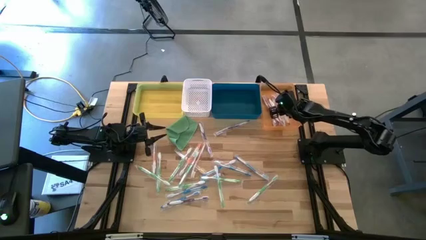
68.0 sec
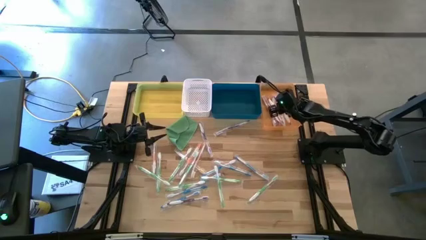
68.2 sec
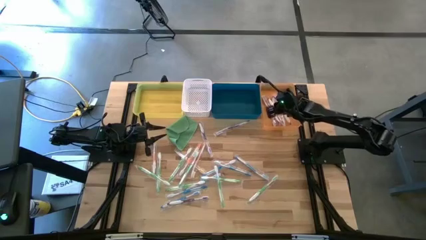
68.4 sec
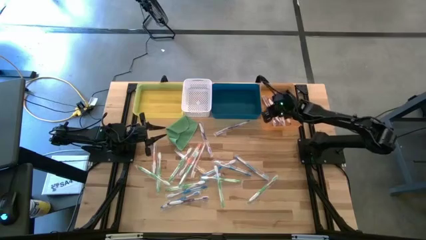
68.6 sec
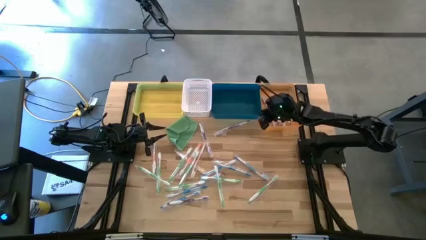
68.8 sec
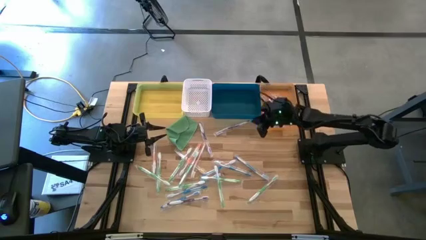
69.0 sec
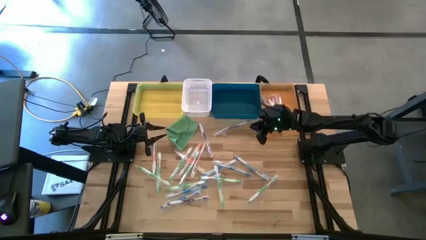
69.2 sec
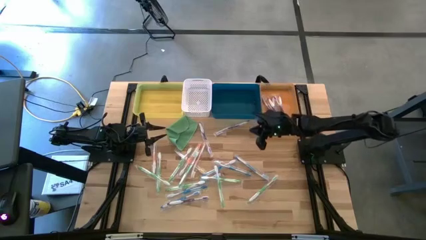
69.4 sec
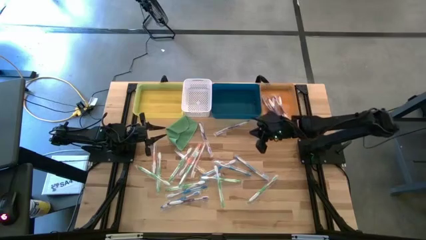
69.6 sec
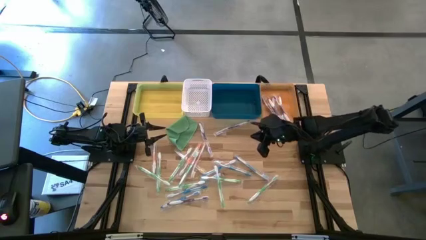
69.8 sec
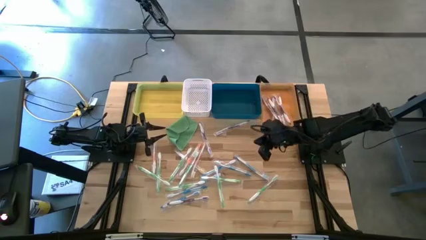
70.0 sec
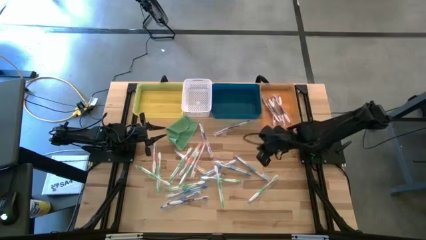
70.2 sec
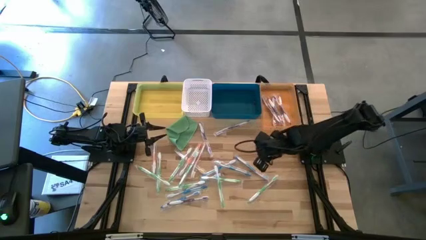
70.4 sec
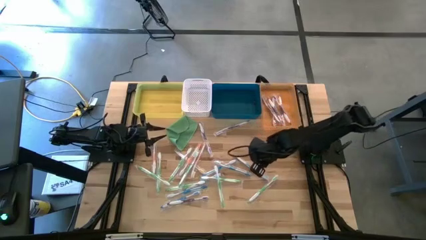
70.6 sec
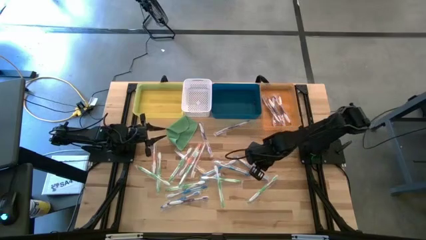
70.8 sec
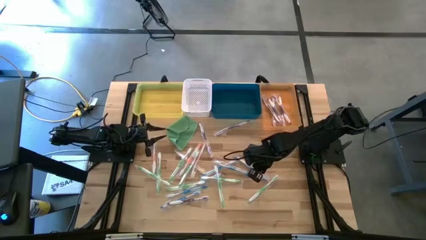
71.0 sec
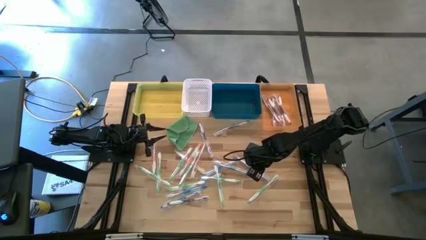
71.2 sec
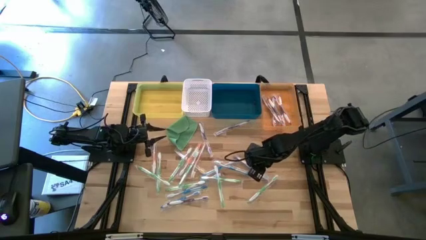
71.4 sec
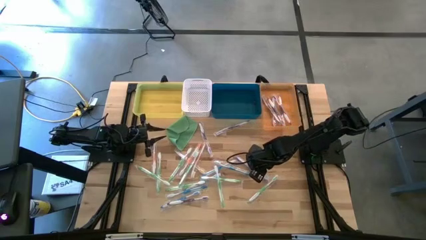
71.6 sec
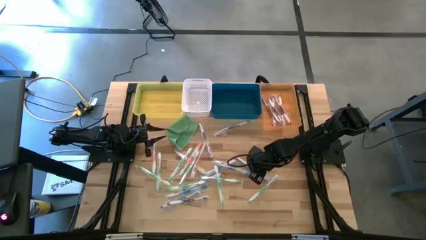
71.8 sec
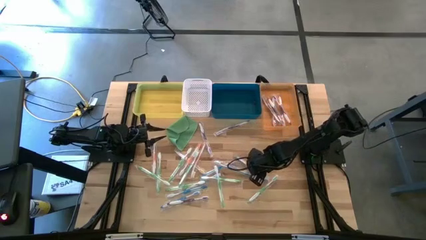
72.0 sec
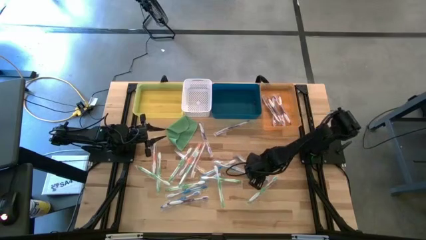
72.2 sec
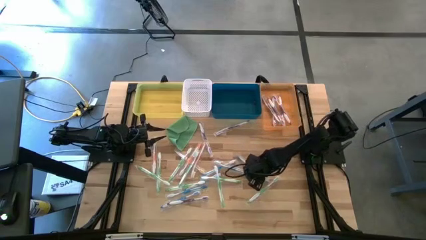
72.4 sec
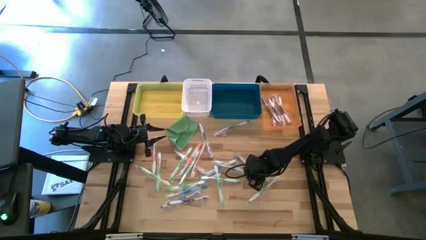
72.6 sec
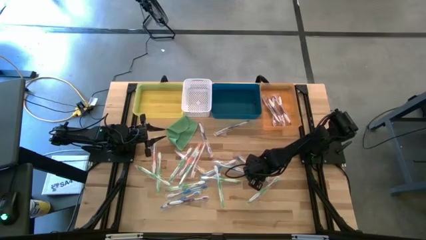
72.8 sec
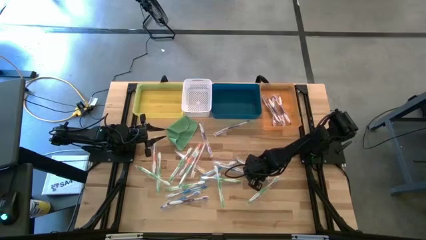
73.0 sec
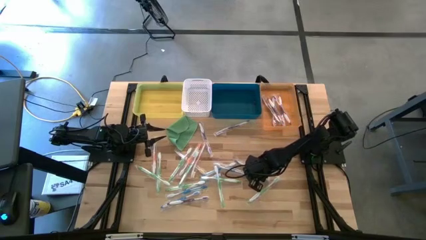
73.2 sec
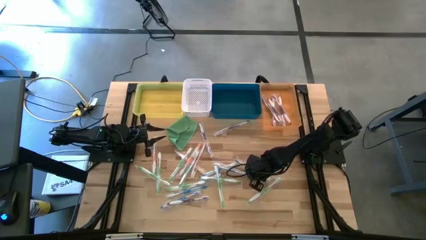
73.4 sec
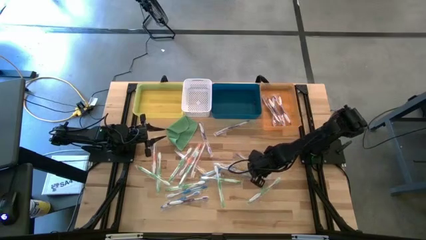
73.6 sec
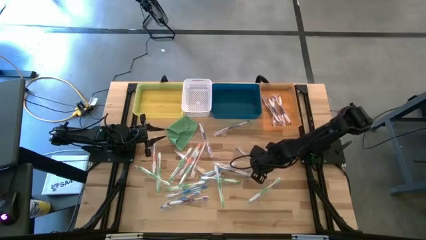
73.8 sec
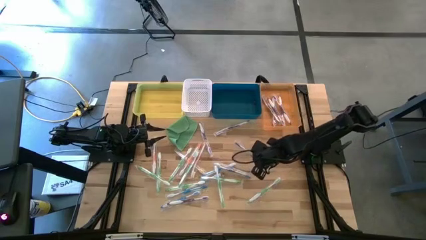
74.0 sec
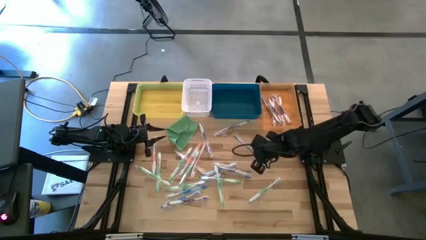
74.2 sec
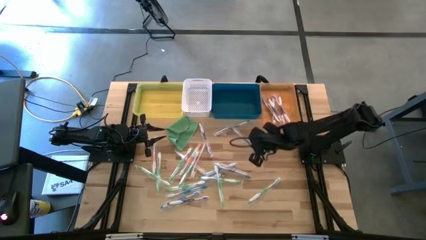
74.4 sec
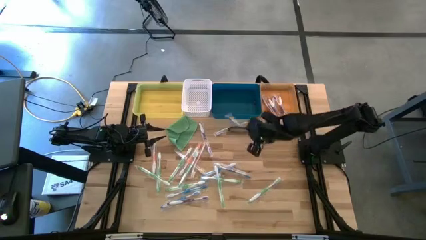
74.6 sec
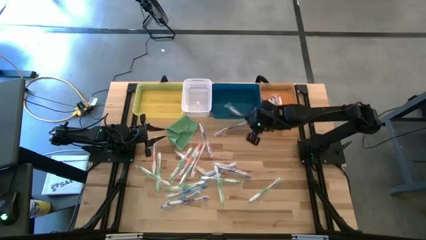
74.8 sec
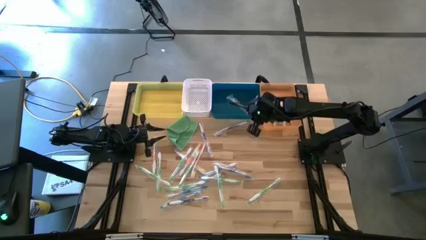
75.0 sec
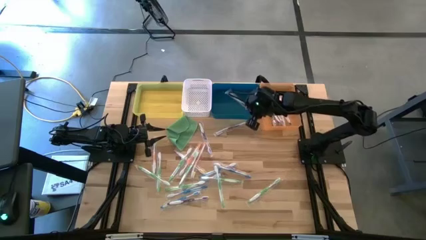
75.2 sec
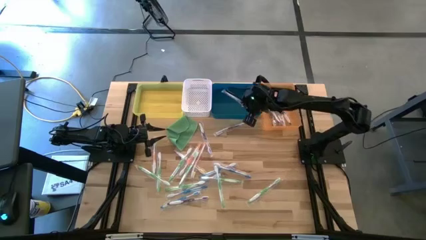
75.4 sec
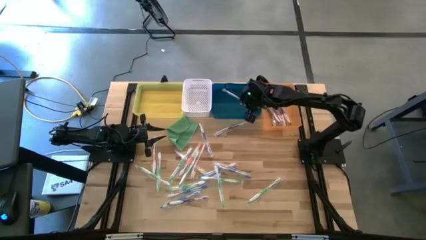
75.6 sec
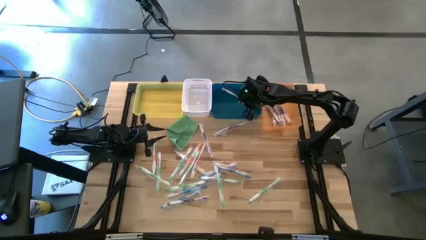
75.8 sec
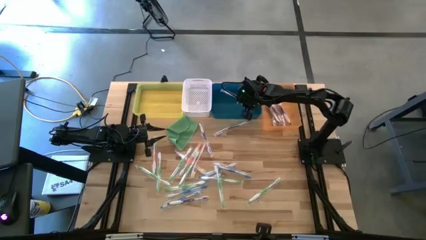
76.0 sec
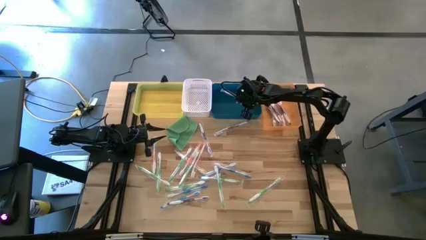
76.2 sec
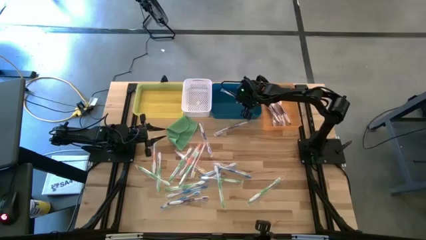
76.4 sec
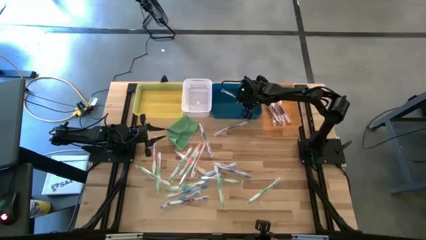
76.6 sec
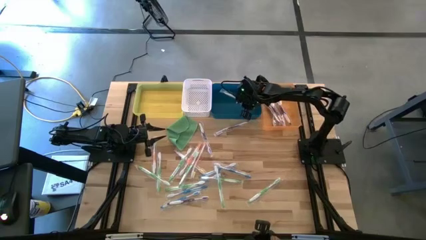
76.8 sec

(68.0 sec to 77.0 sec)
Task: Pick & Place Toothbrushes
Put the blue toothbrush into the blue bin

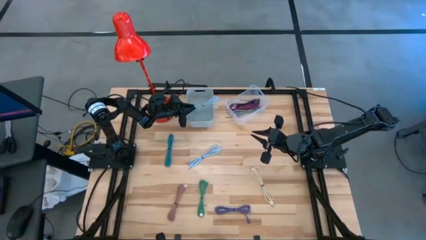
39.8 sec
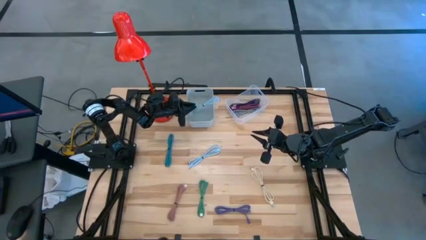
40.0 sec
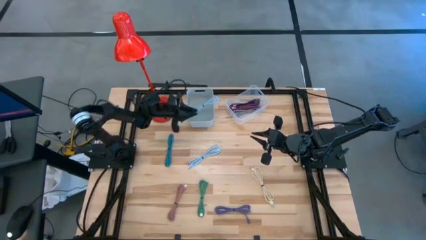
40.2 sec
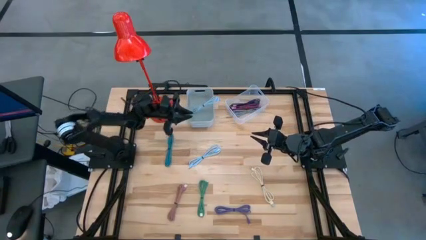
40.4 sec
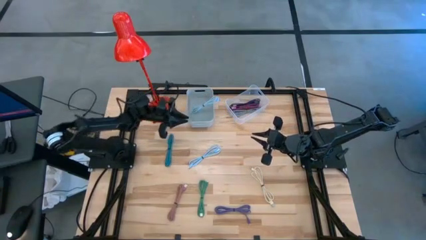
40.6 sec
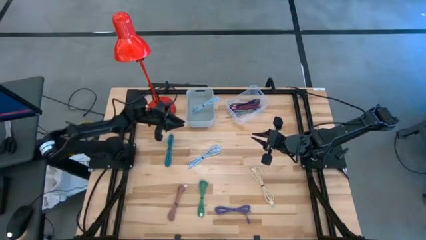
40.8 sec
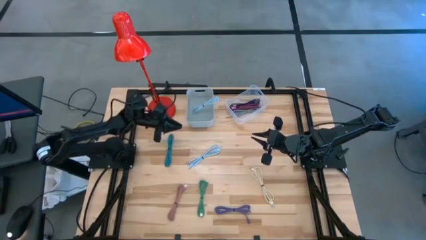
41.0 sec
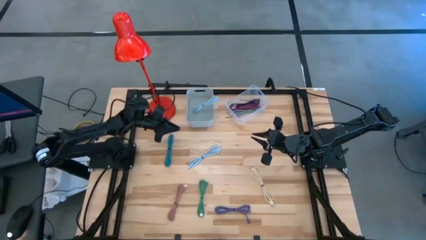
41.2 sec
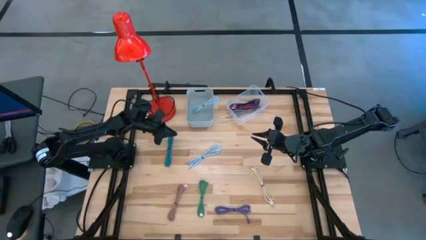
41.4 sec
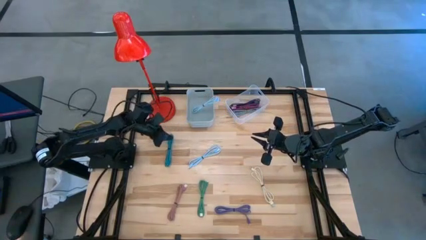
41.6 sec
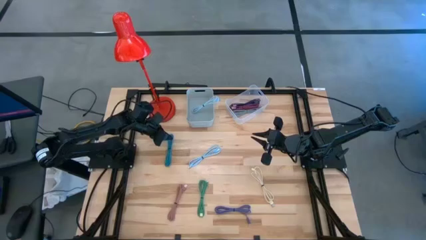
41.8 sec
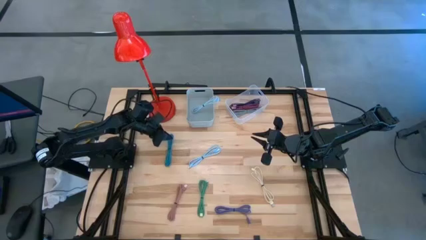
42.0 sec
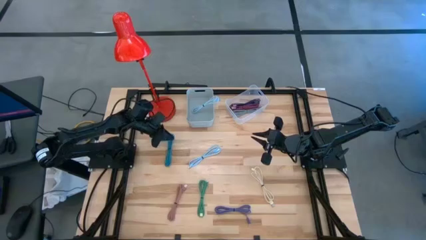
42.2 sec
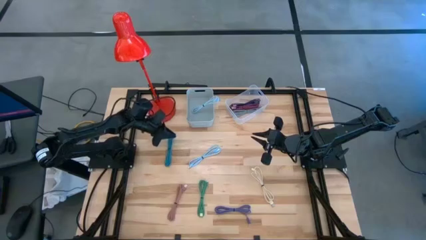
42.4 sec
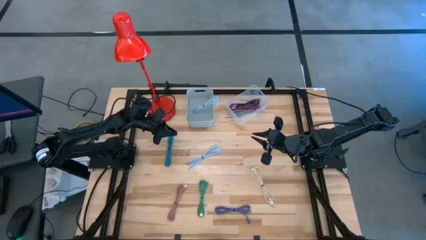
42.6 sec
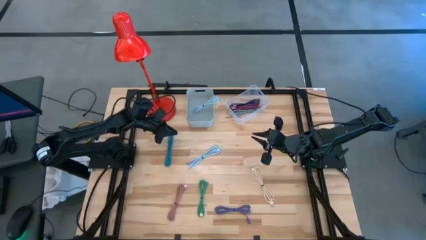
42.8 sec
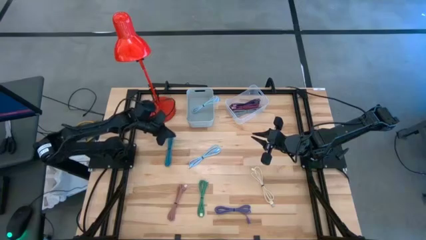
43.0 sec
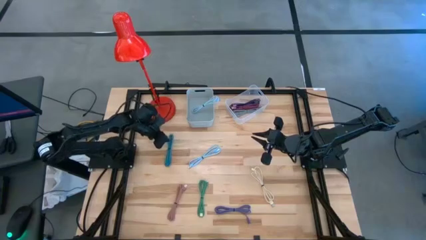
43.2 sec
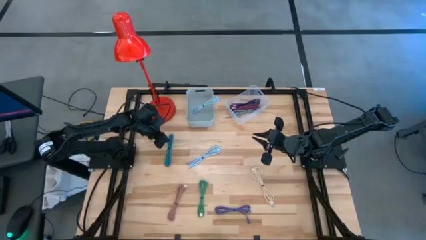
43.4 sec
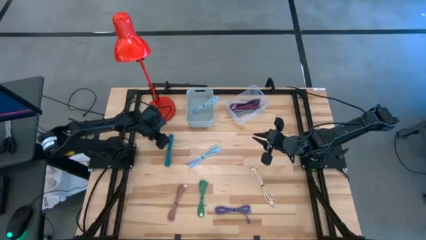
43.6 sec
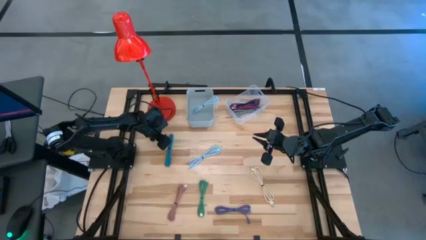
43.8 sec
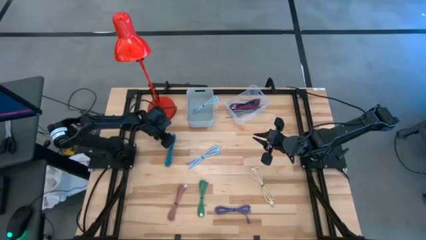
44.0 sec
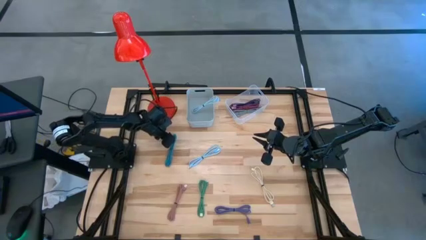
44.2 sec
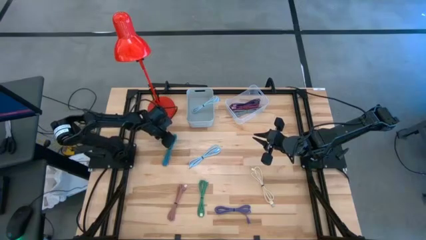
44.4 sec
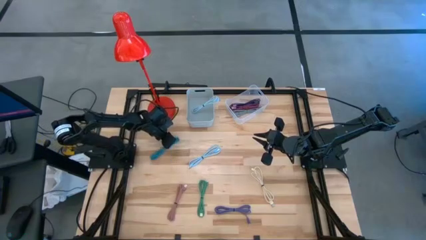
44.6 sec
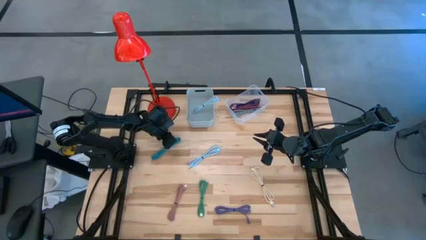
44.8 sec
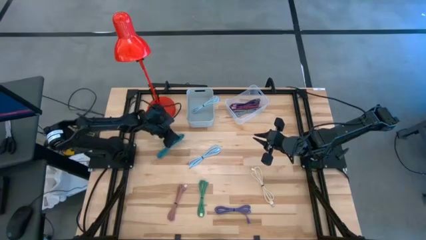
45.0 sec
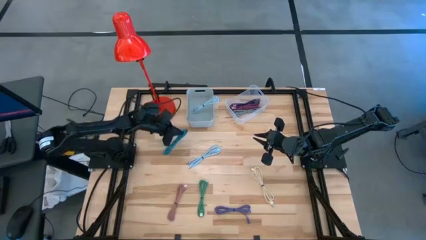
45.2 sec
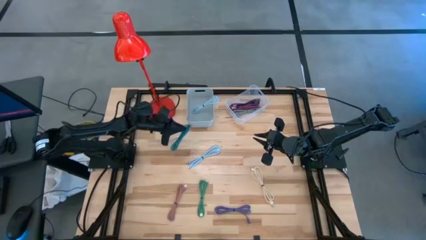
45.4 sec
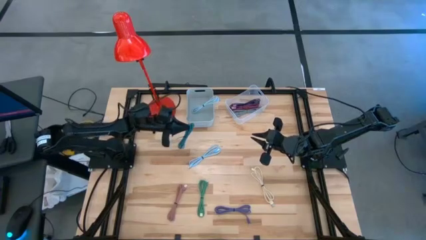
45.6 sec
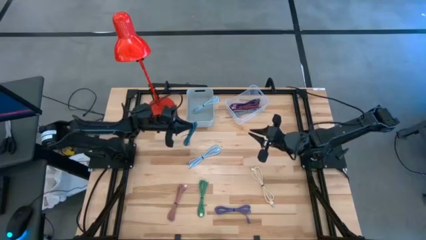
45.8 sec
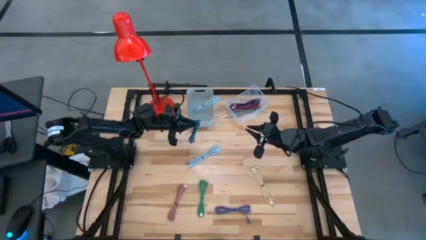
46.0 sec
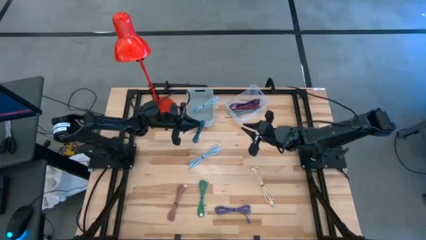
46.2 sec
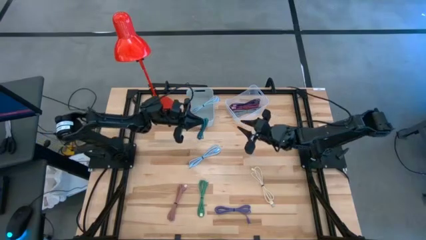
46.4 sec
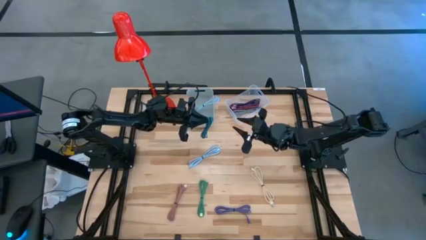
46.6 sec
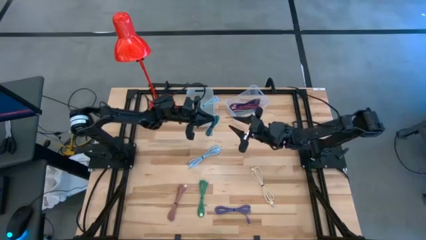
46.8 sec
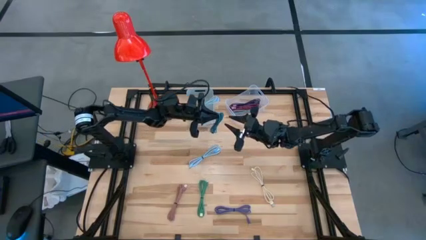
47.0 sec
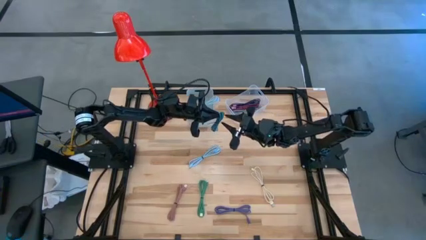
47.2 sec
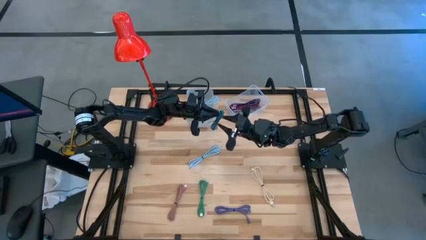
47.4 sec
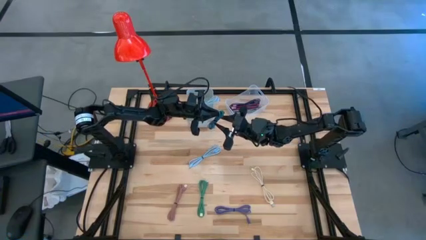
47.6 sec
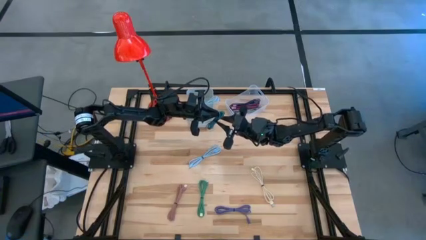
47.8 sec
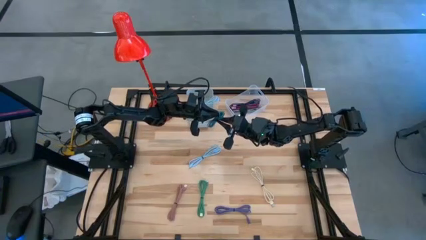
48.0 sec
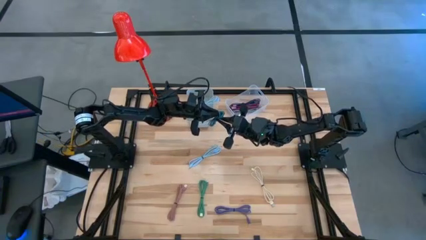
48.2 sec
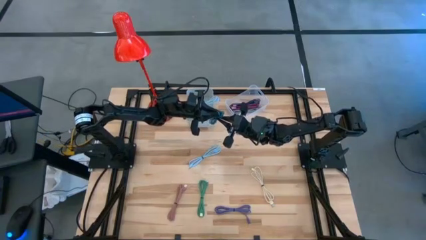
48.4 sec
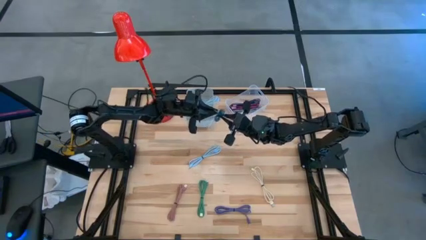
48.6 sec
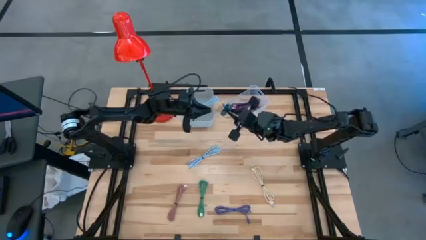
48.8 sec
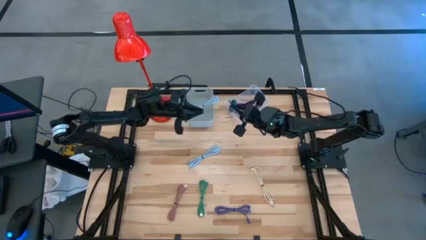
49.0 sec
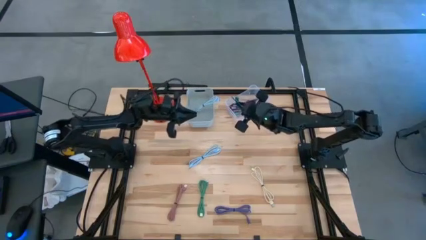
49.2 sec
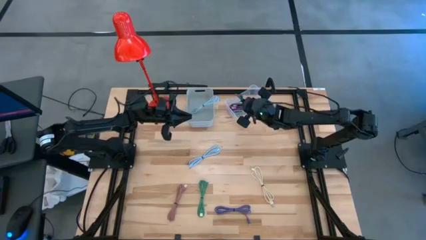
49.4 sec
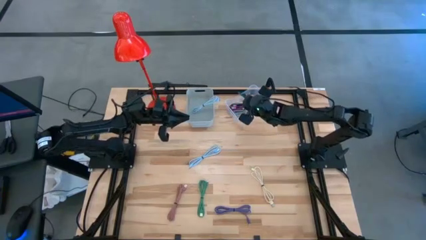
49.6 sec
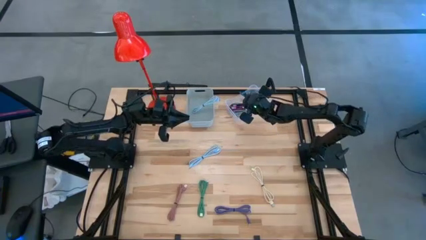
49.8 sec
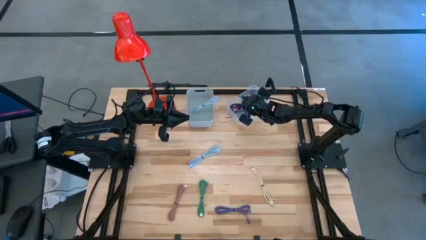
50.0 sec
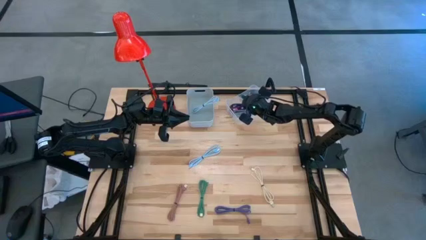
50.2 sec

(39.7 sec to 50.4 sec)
Task: Pick & Place USB Port
Put the blue charger cable into the transparent bin
